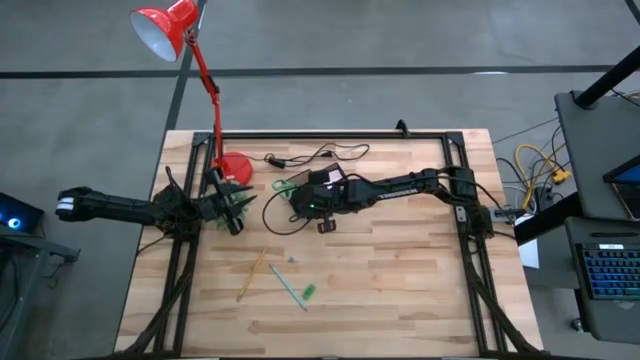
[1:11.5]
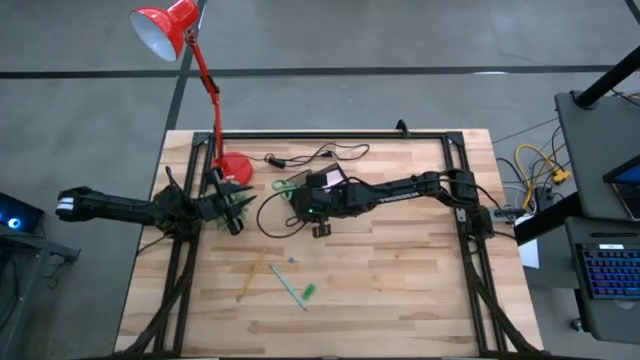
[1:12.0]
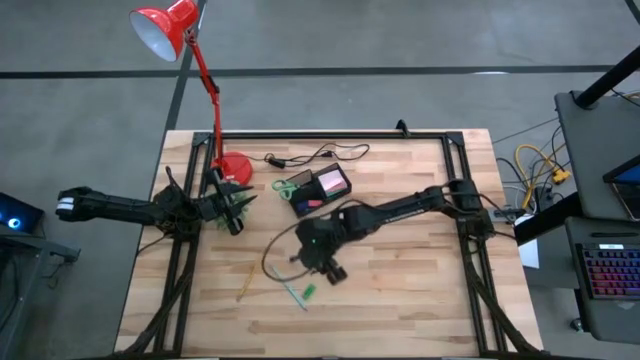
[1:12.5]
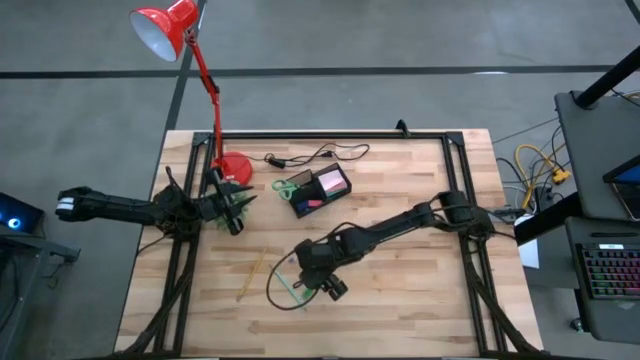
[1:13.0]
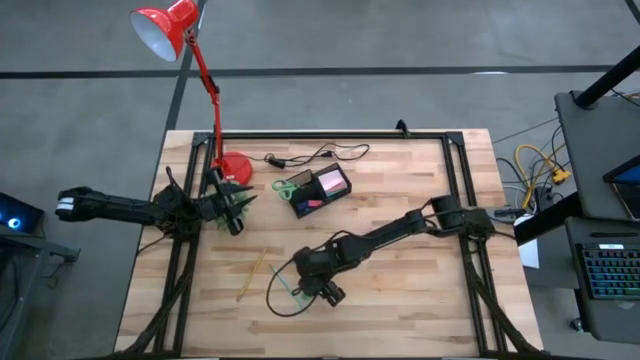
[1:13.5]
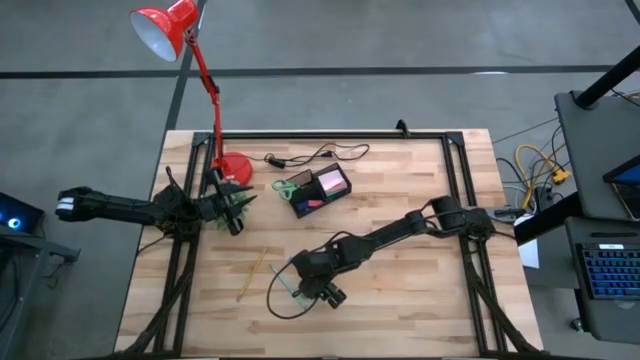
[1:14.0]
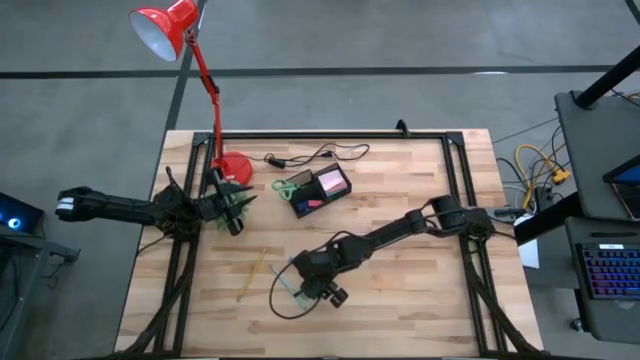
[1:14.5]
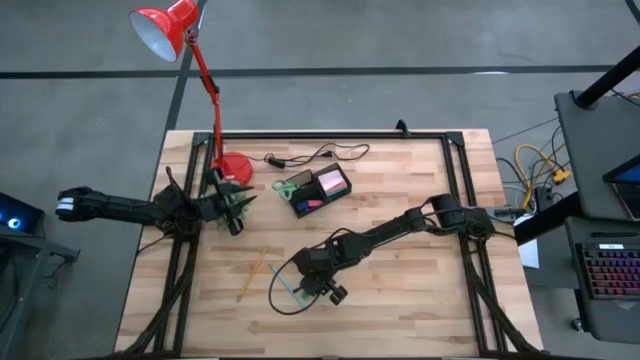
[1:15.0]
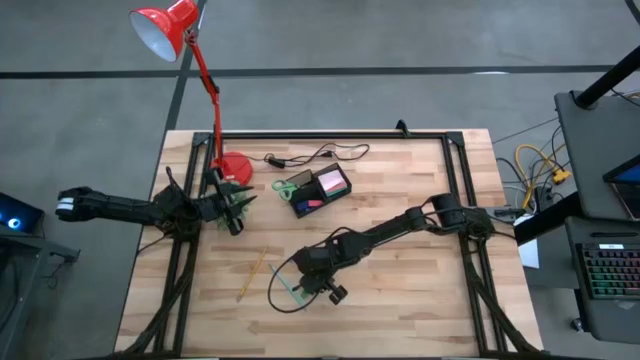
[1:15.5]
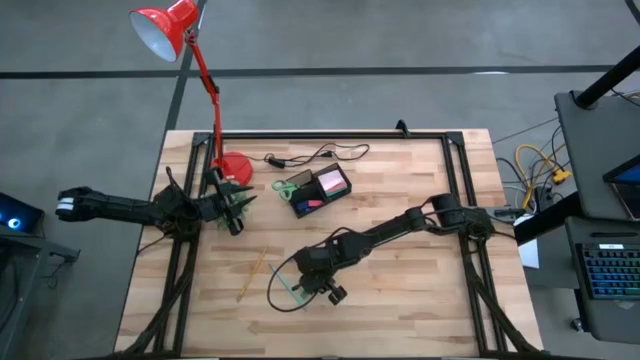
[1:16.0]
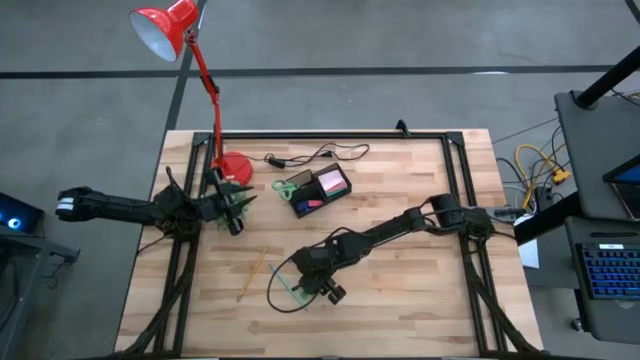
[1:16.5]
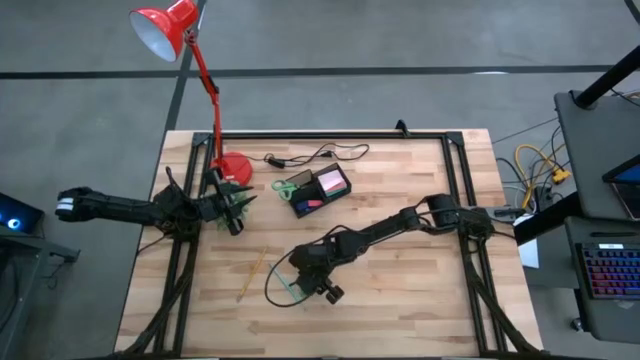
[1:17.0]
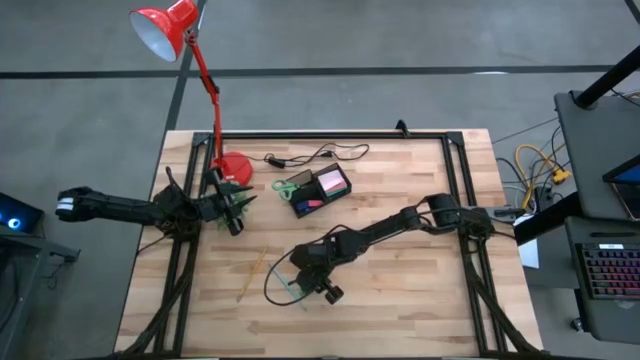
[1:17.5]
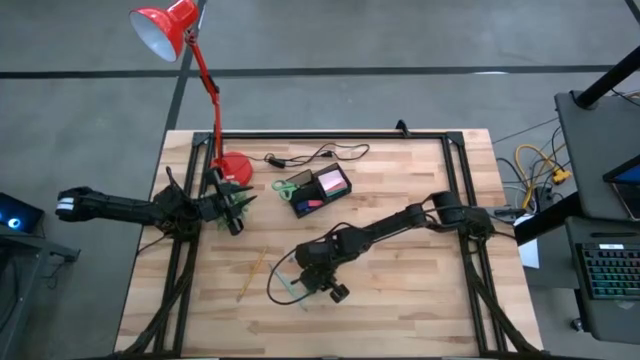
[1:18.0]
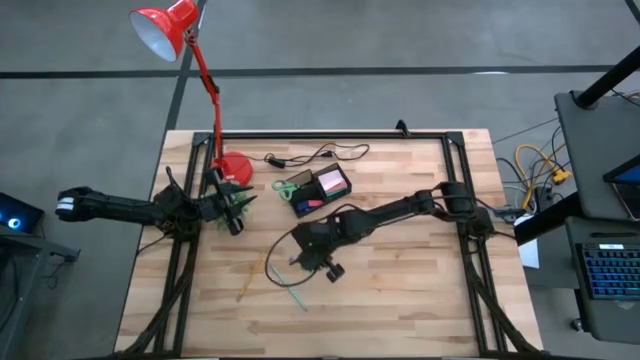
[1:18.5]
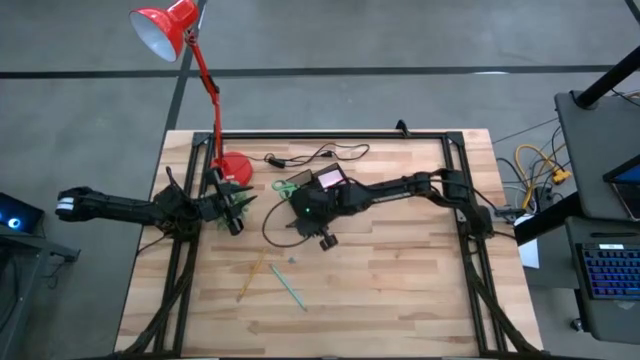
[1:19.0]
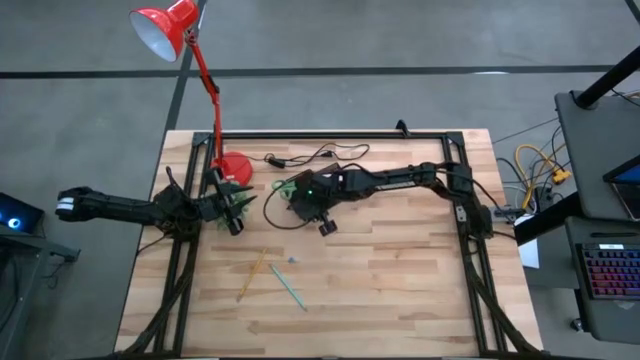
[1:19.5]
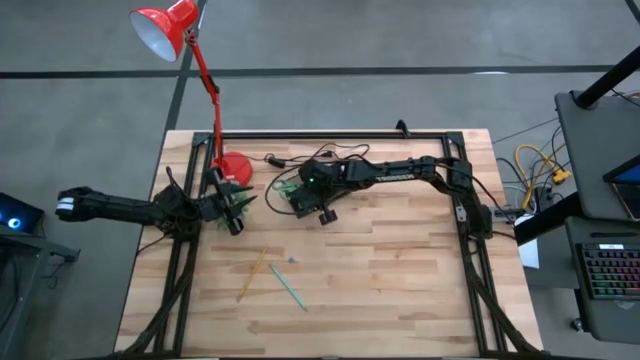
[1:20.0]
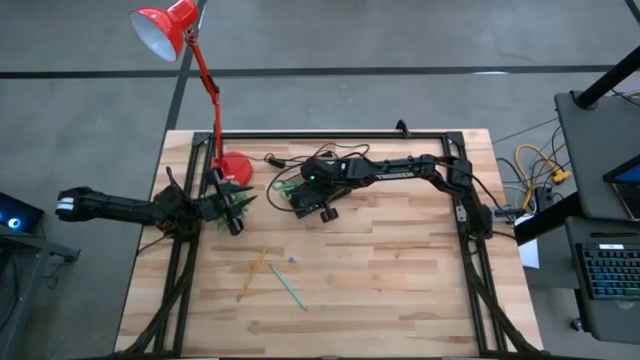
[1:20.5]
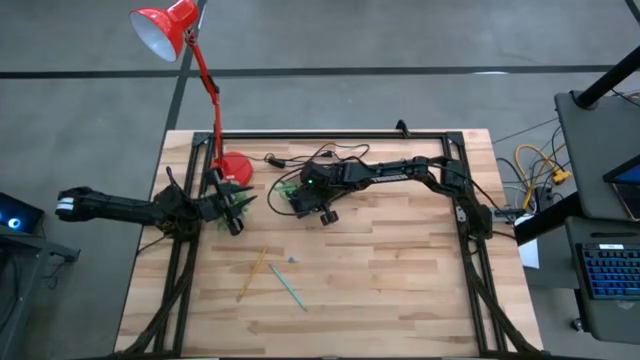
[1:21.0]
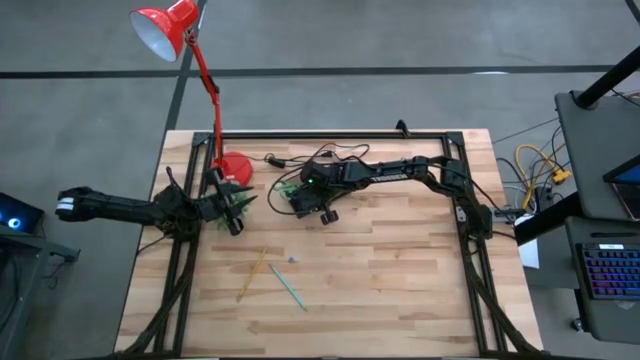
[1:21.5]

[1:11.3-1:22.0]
Task: Pick and place office supplies into organizer
Put the green eraser into the black desk organizer

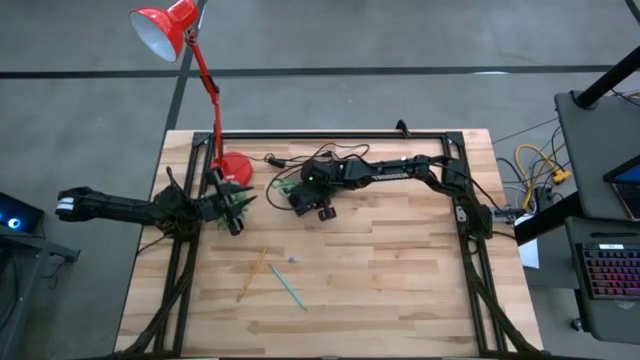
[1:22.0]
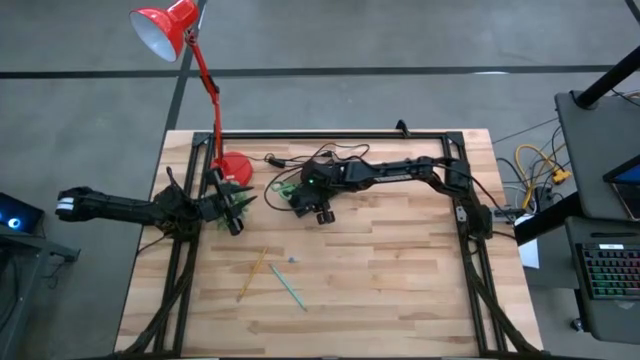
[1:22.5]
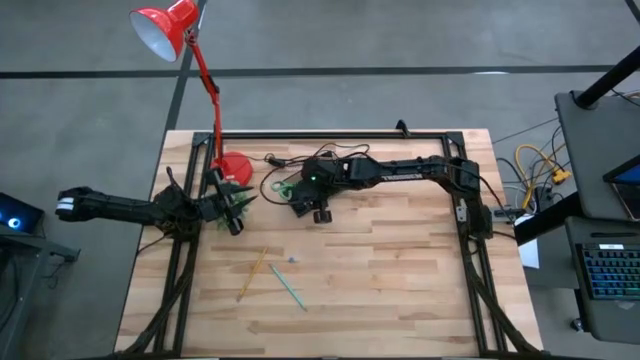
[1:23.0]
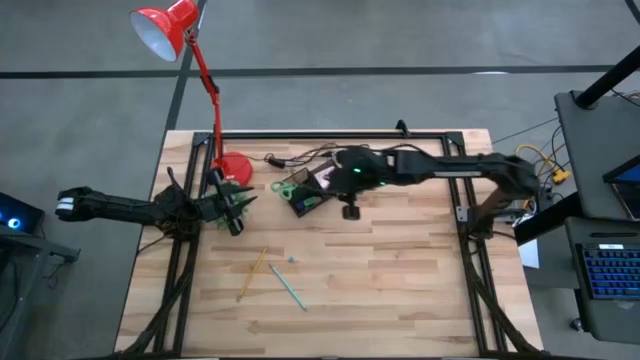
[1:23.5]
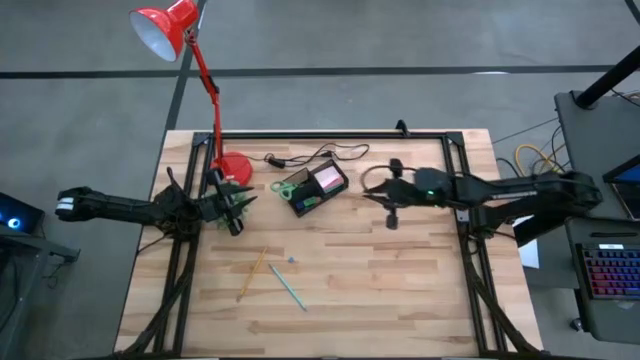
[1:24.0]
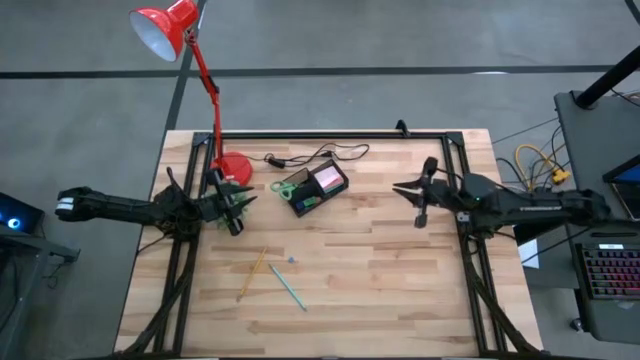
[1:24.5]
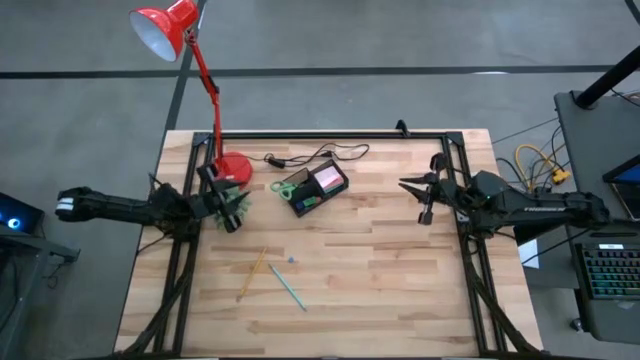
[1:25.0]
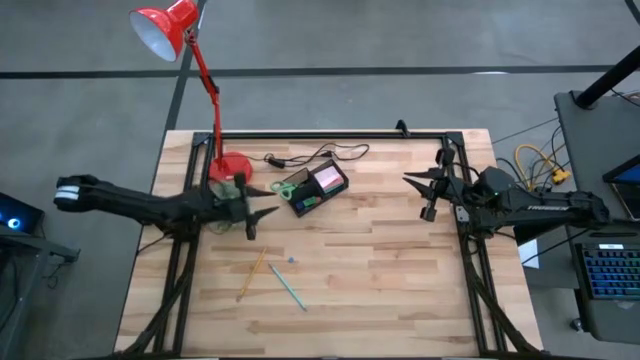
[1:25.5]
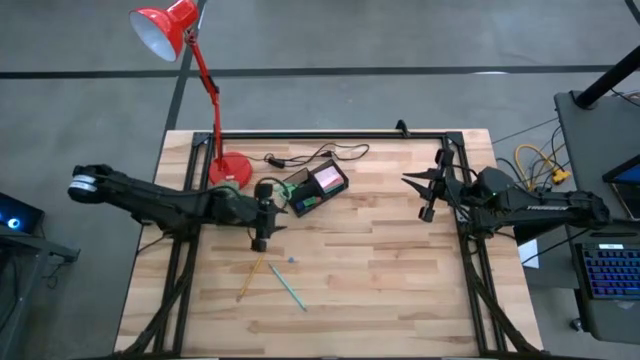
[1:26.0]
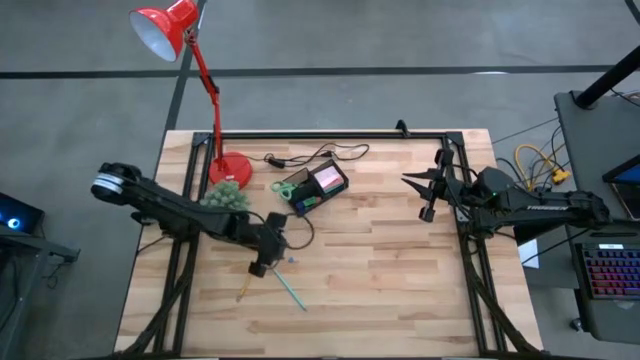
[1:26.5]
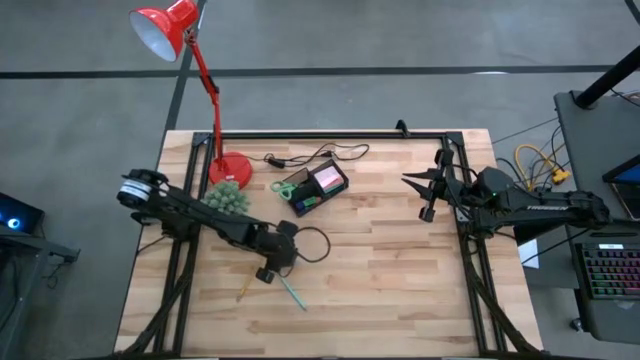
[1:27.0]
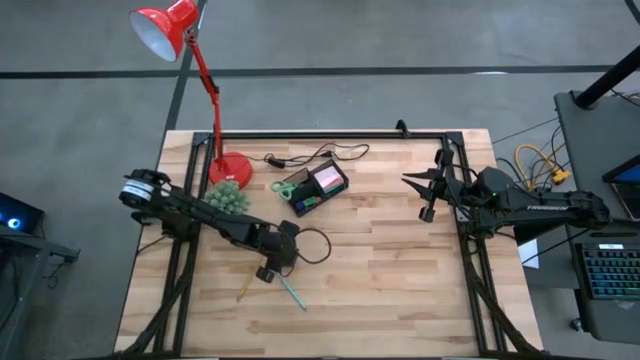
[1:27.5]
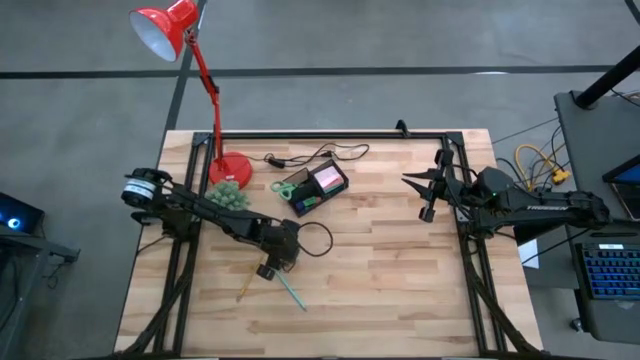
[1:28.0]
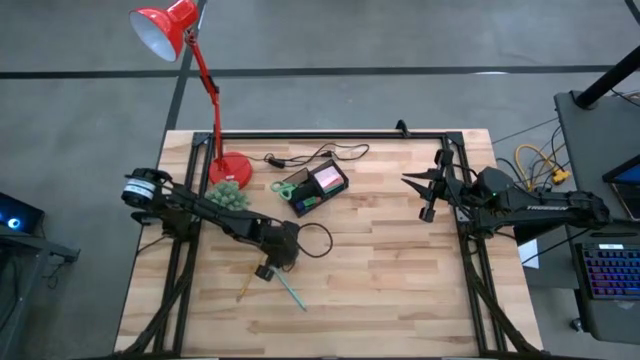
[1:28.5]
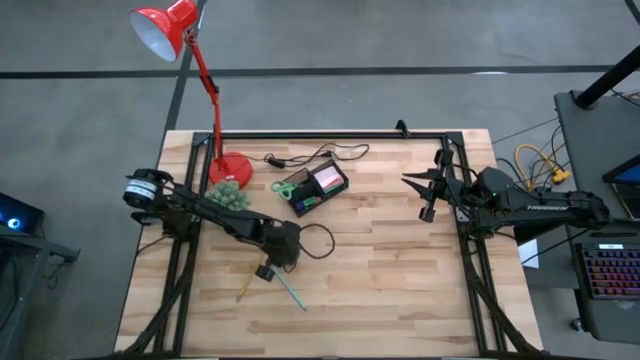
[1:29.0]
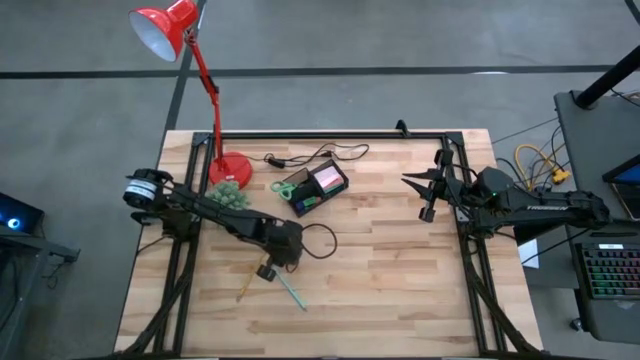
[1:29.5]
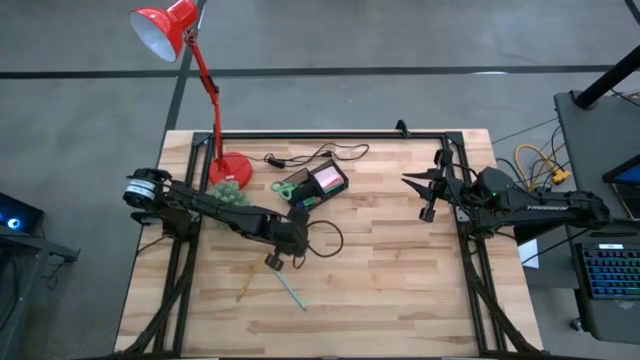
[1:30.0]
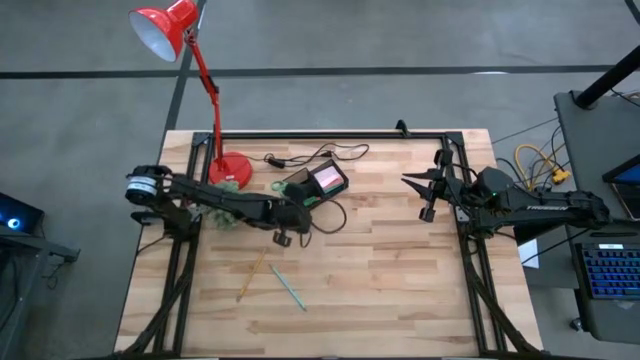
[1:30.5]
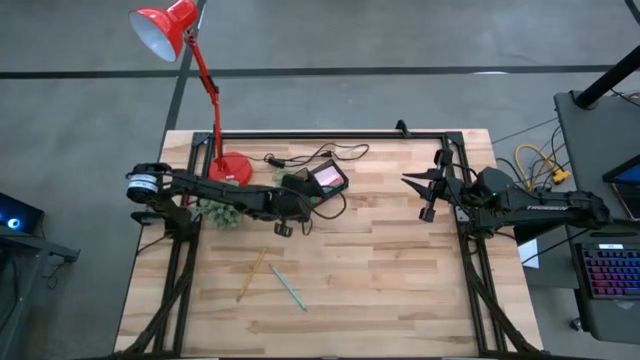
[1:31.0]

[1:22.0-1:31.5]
Put the blue binder clip into the black desk organizer

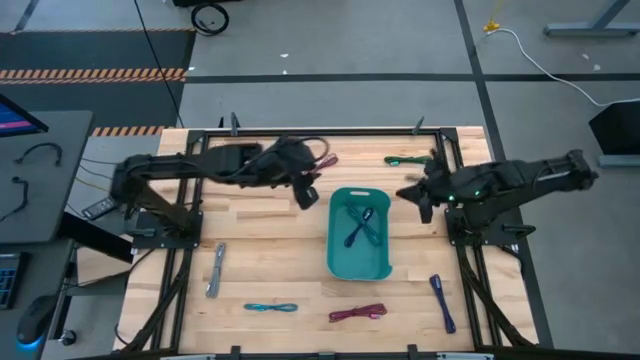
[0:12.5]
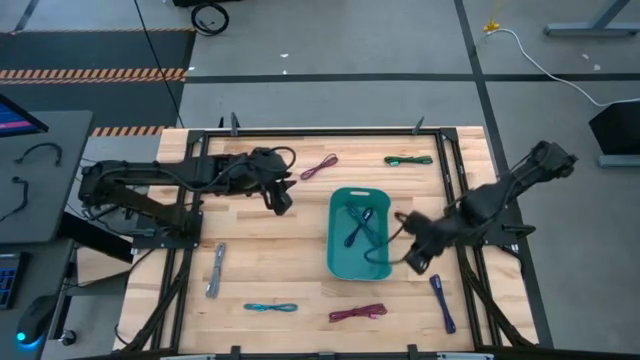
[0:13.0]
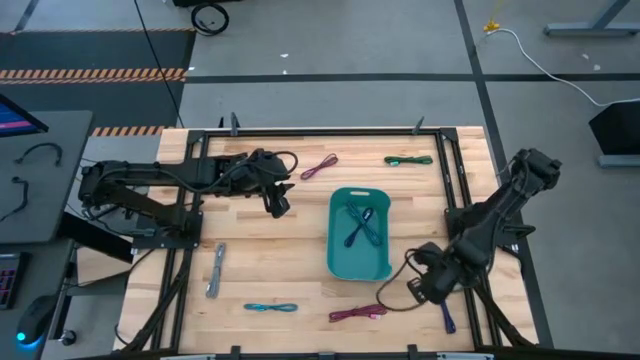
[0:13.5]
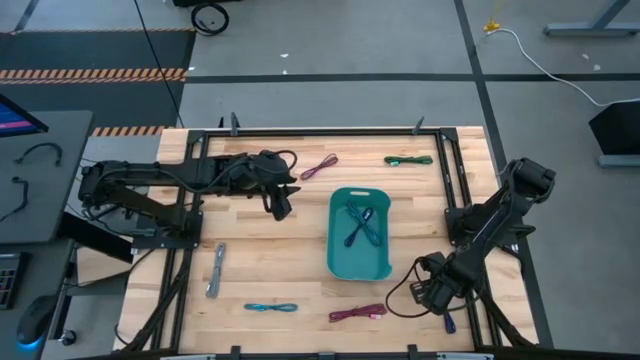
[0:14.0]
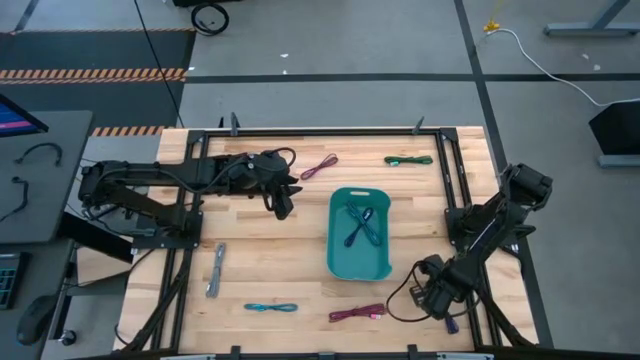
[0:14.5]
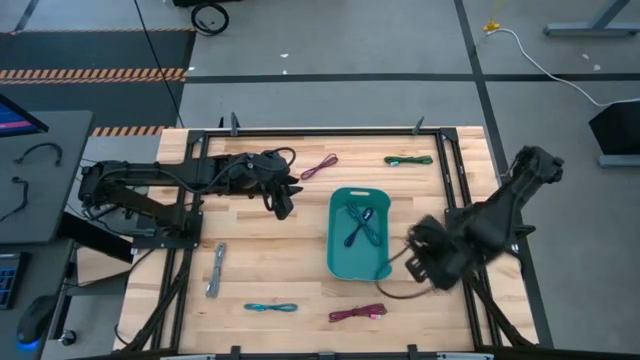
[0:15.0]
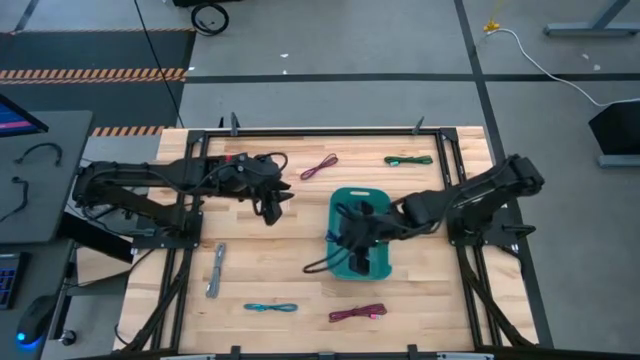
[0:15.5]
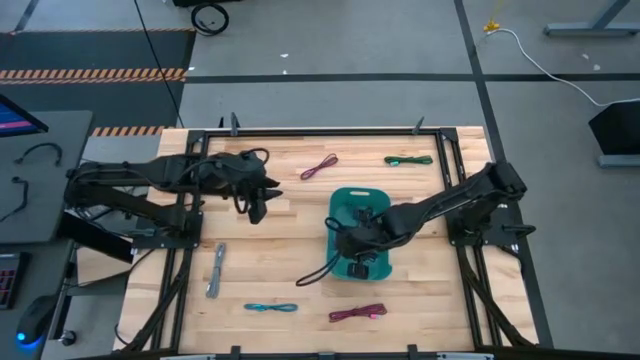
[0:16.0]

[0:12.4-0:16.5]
Task: Pick and place USB-C Cables
Put the blue USB cable into the light green bin
